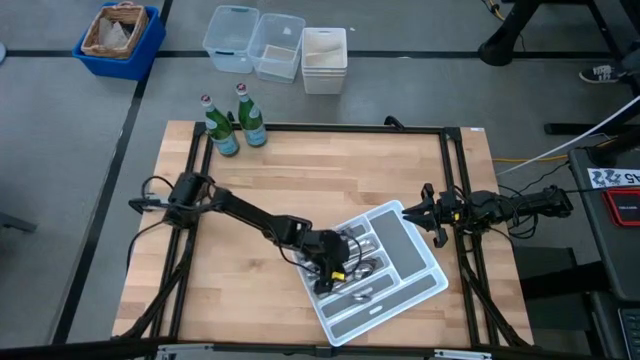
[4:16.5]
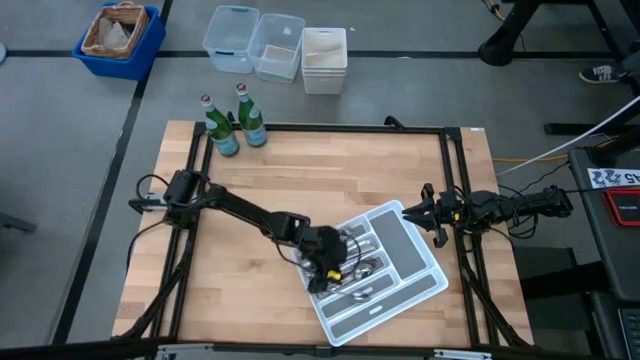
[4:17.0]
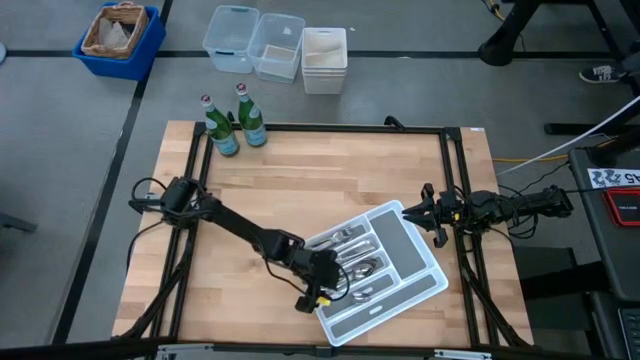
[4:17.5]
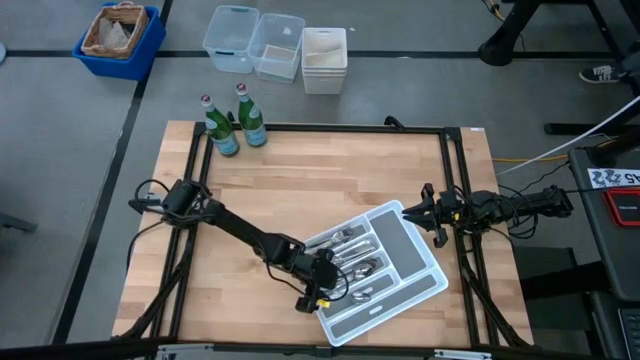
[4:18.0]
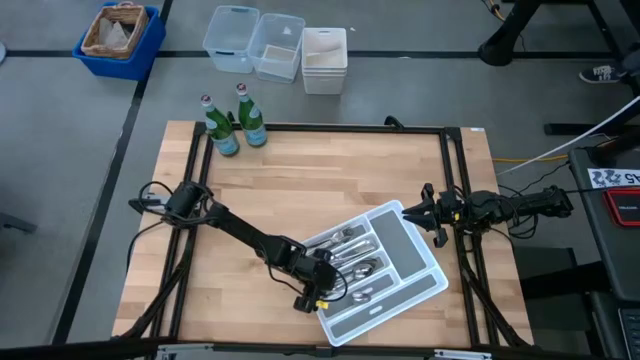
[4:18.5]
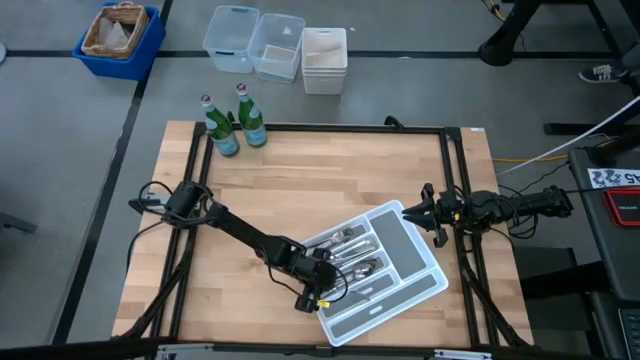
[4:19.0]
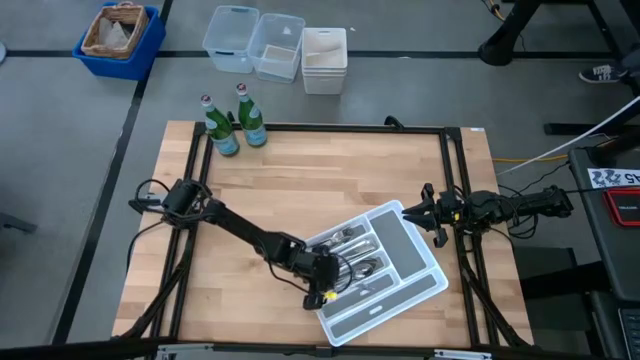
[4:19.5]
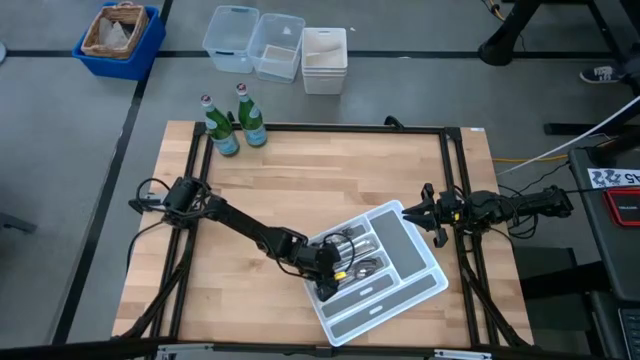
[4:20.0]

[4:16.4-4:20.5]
Task: Sort silverware
Put the silver spoon into the white silverware tray

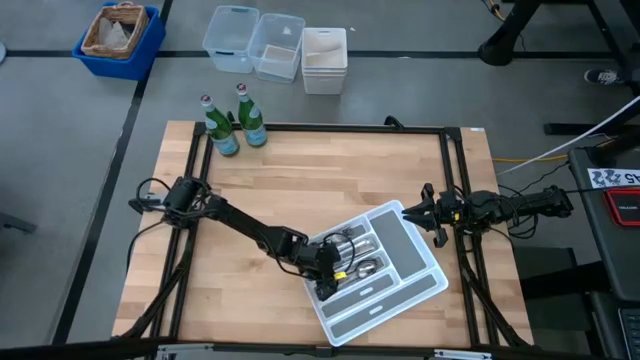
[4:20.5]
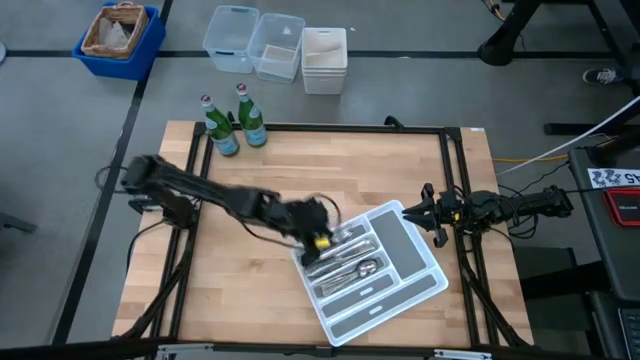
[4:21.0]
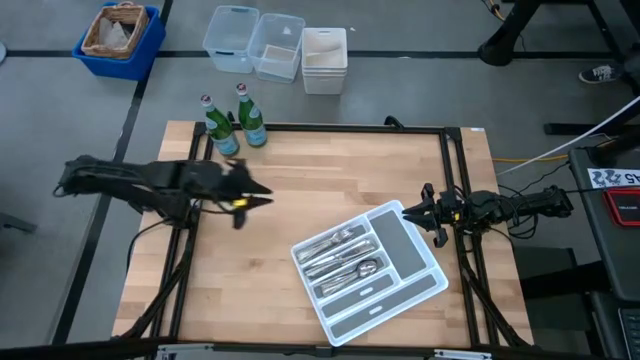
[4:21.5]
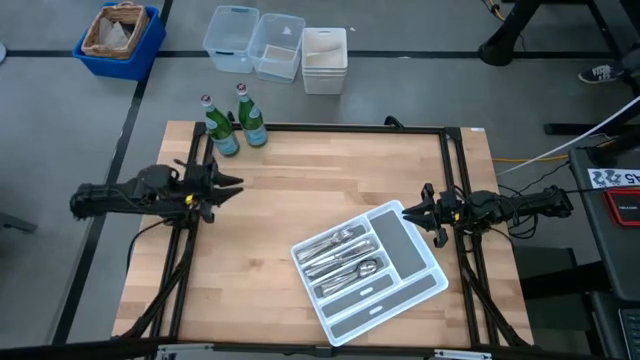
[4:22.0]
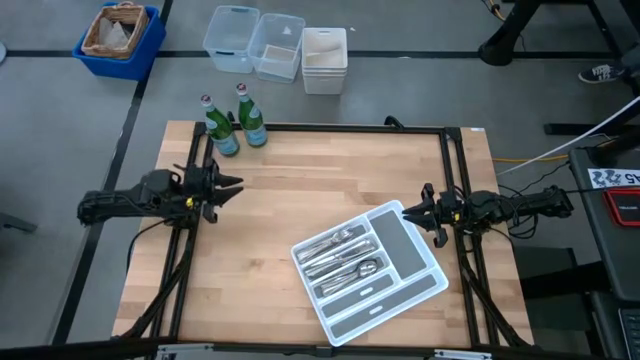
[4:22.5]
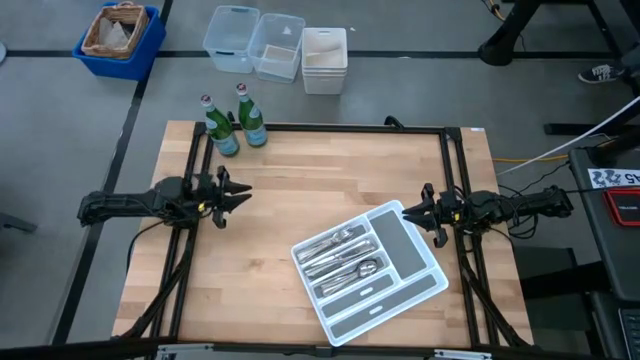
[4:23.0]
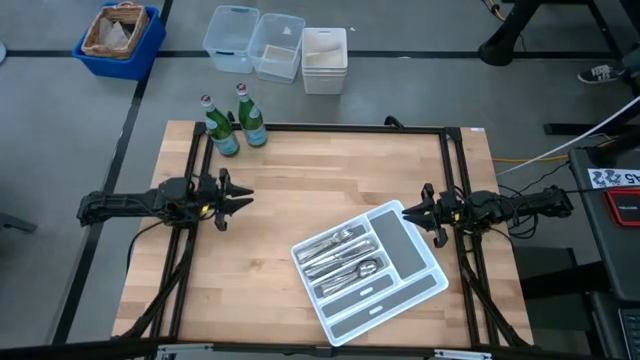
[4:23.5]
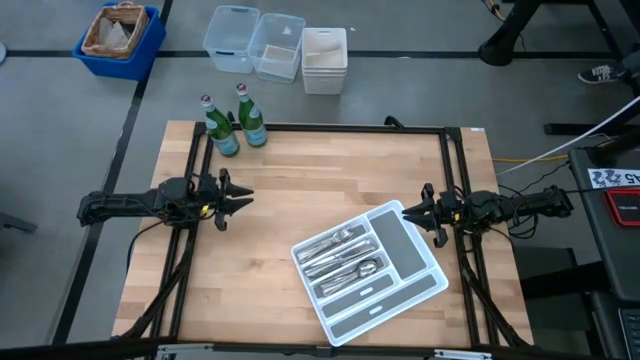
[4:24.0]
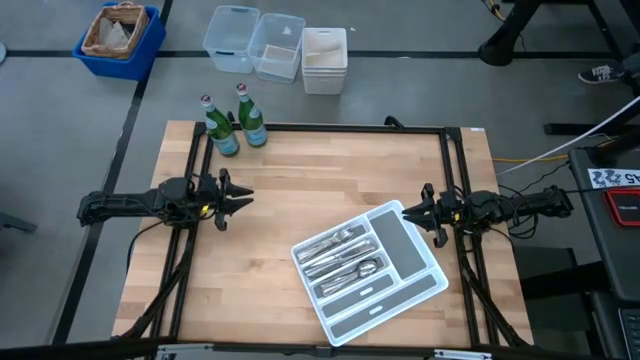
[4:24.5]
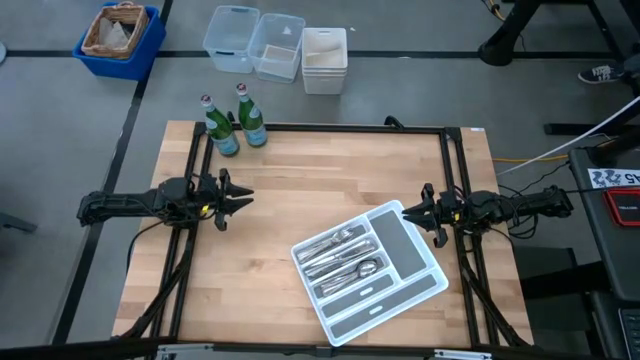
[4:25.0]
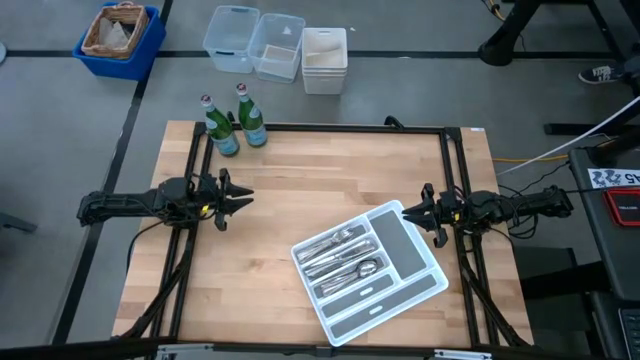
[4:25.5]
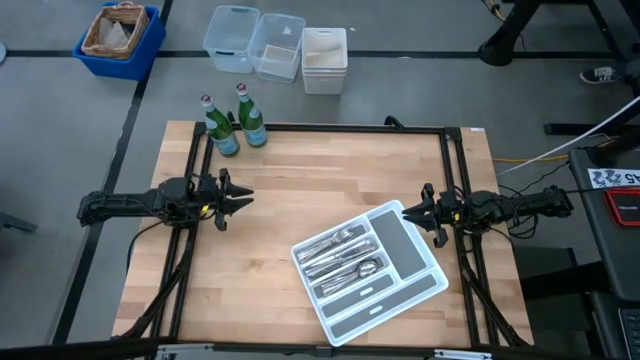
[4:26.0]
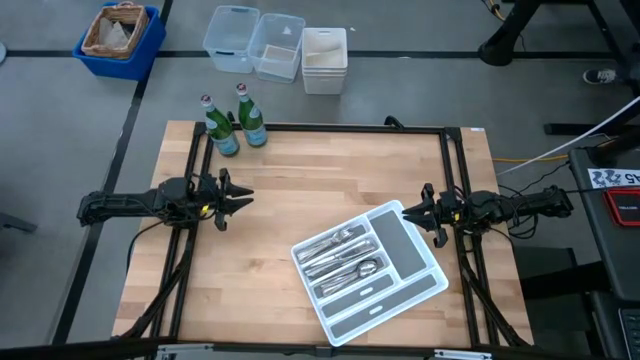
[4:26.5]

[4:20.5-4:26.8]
Return to Home Position

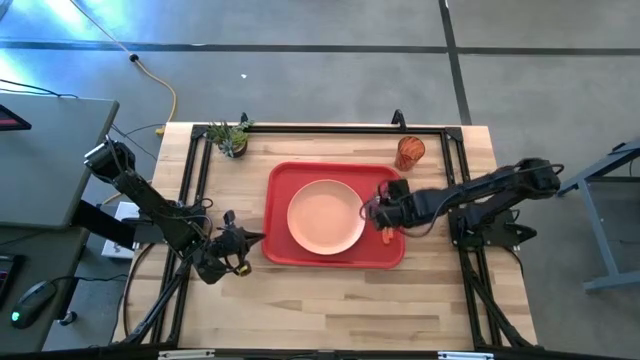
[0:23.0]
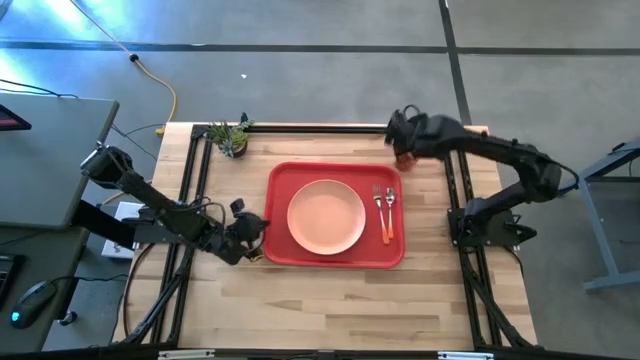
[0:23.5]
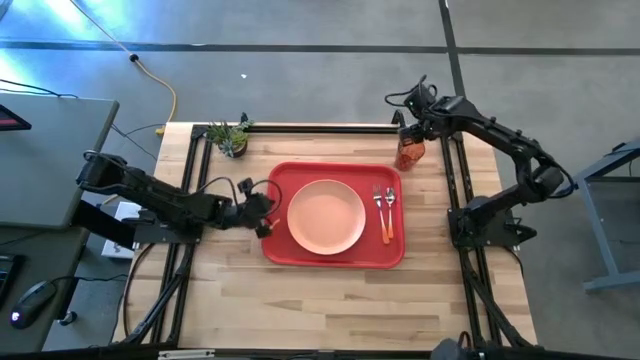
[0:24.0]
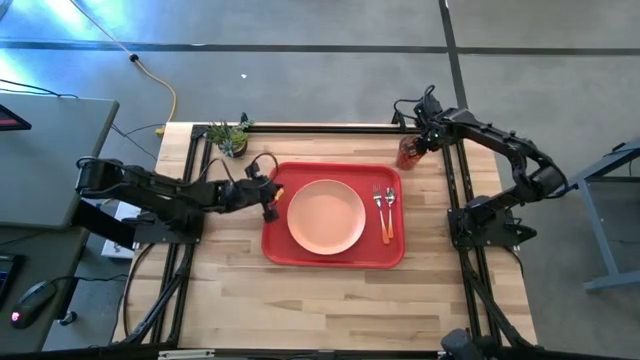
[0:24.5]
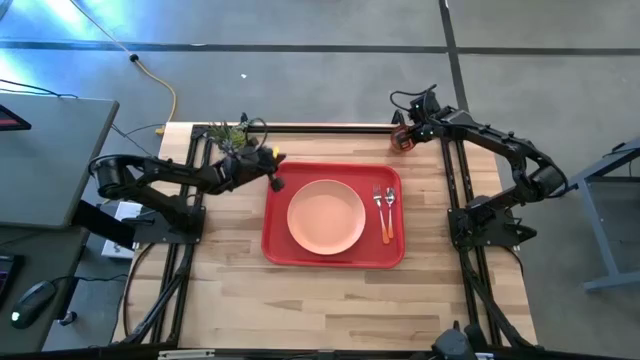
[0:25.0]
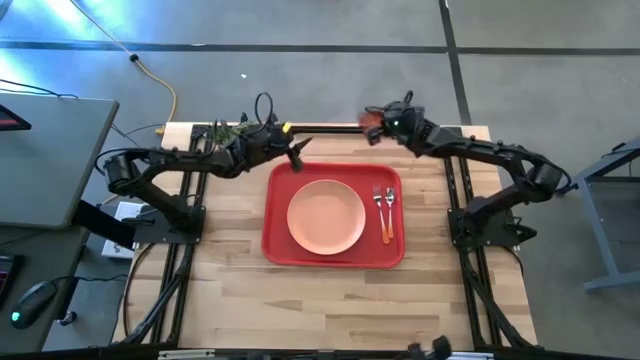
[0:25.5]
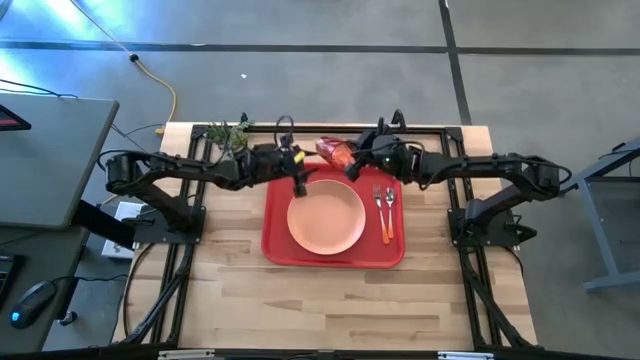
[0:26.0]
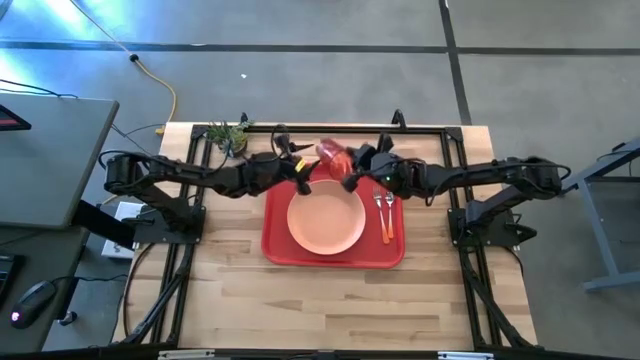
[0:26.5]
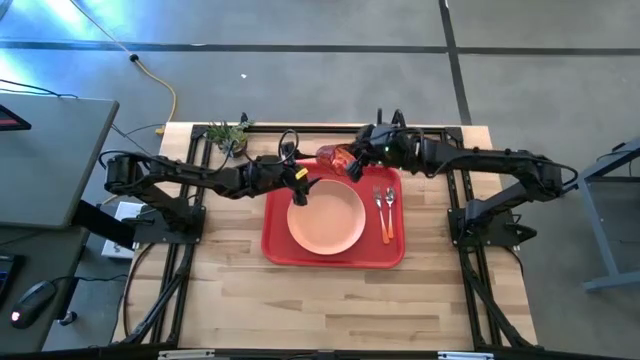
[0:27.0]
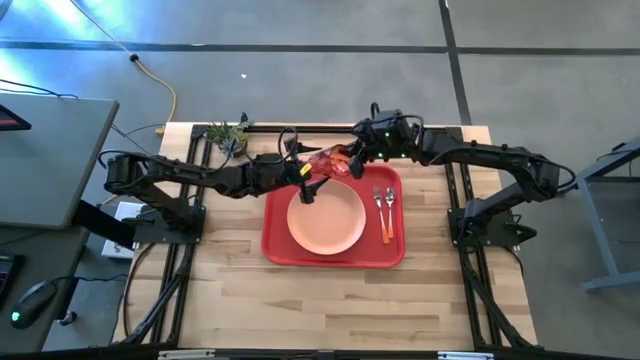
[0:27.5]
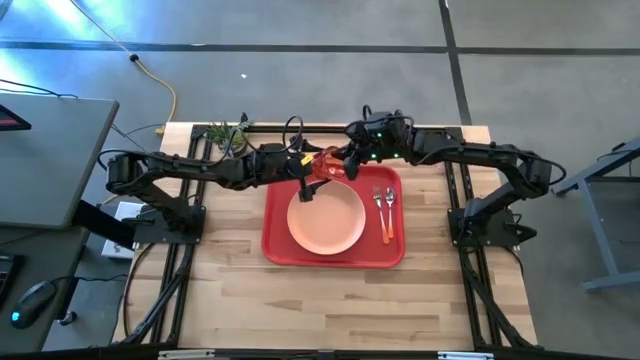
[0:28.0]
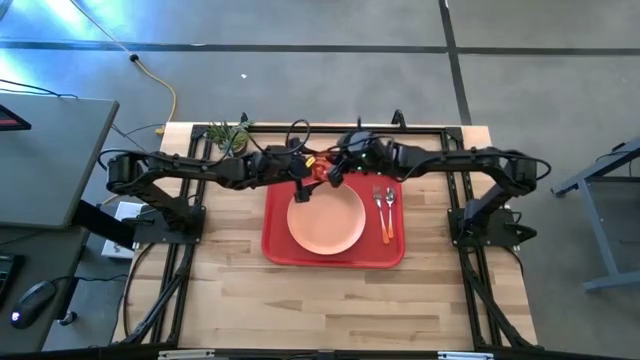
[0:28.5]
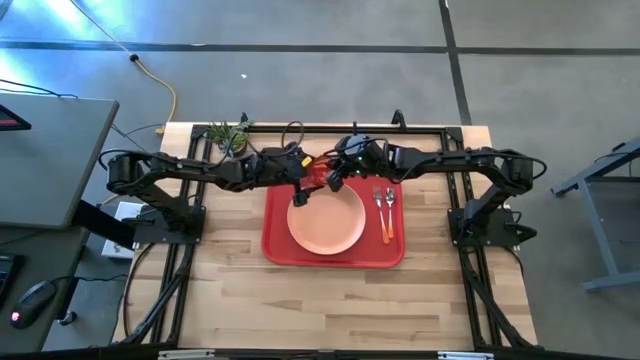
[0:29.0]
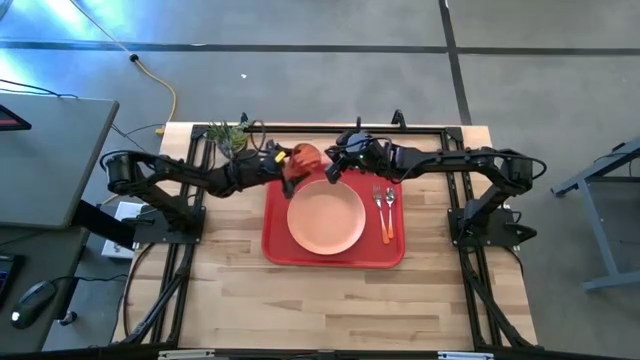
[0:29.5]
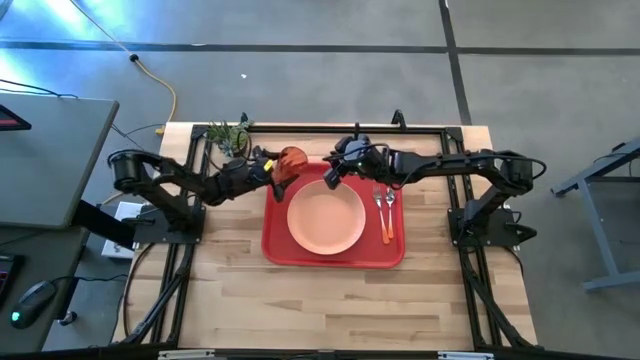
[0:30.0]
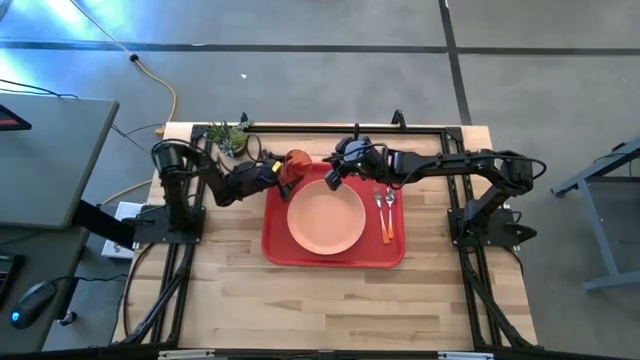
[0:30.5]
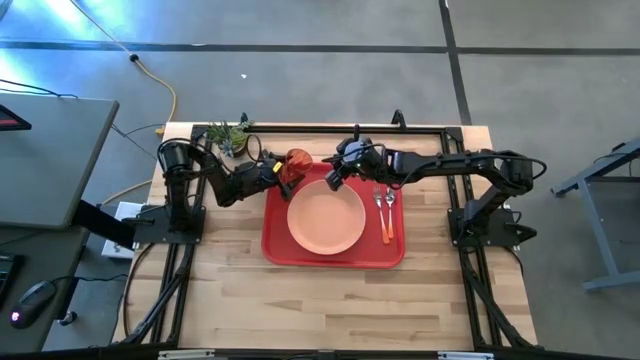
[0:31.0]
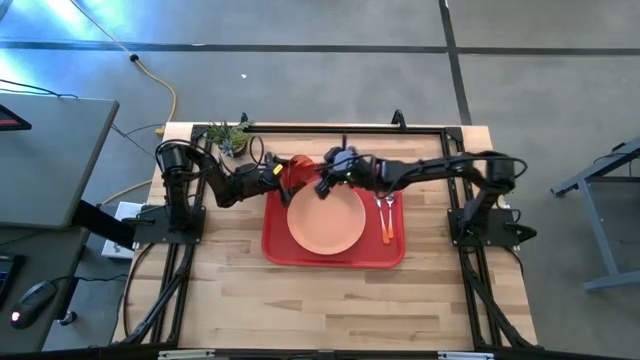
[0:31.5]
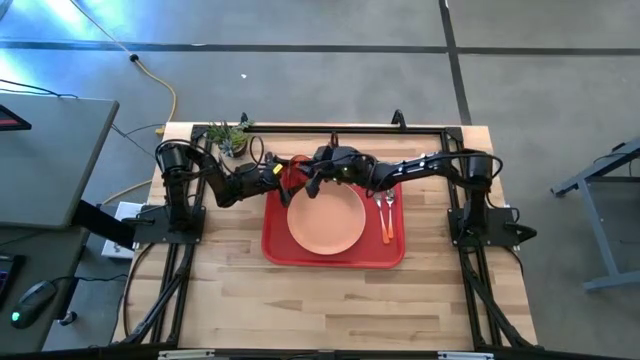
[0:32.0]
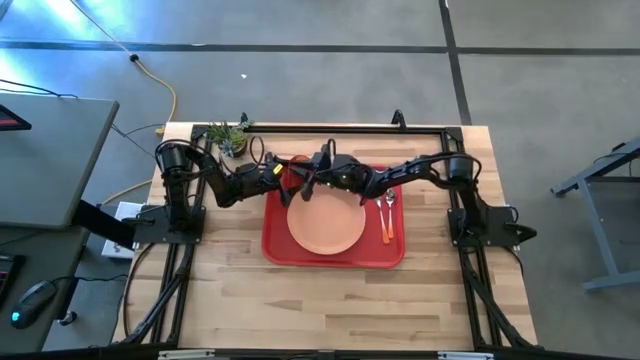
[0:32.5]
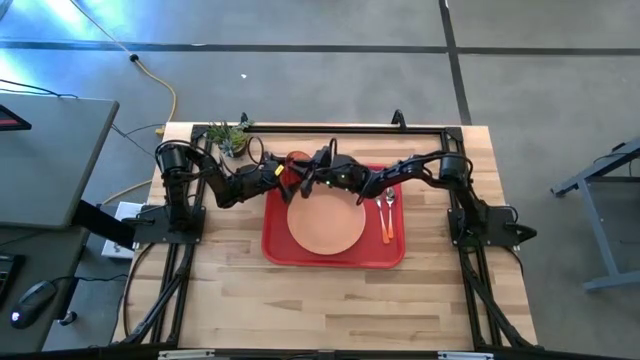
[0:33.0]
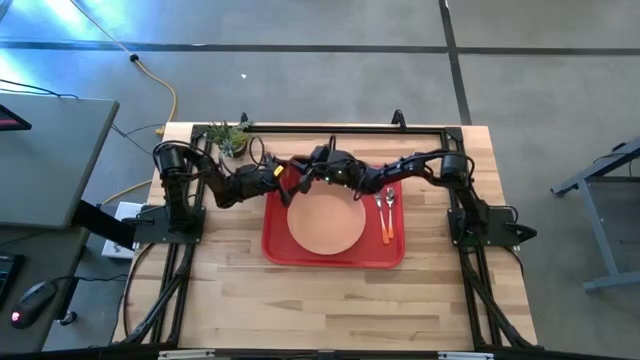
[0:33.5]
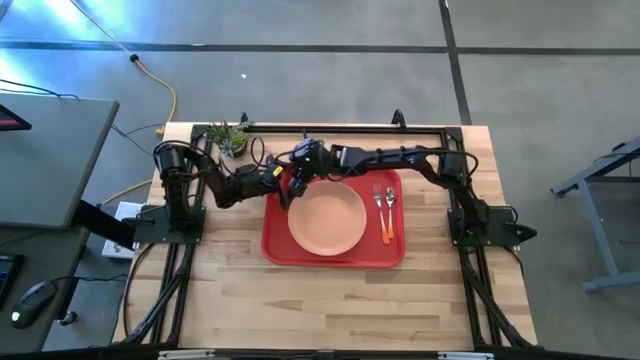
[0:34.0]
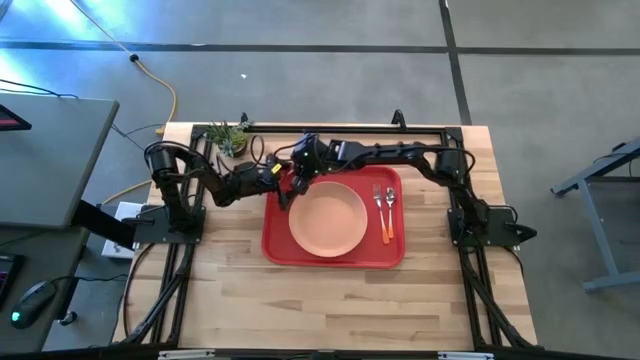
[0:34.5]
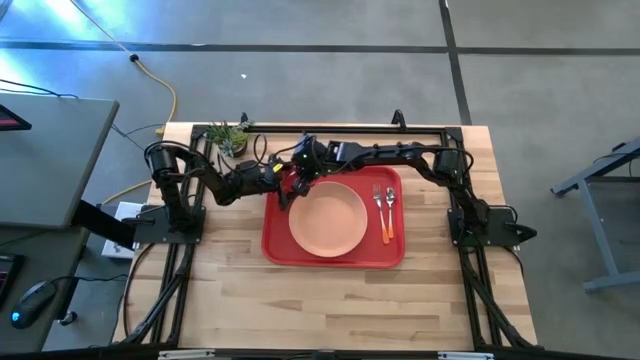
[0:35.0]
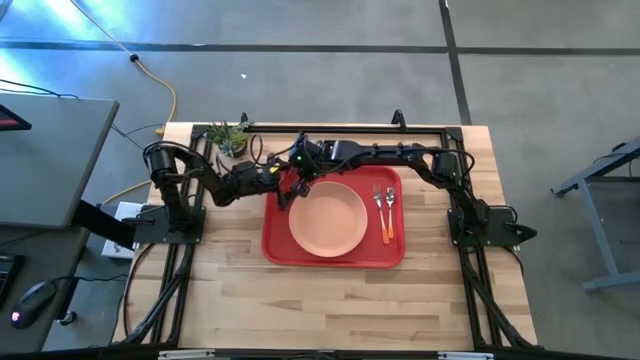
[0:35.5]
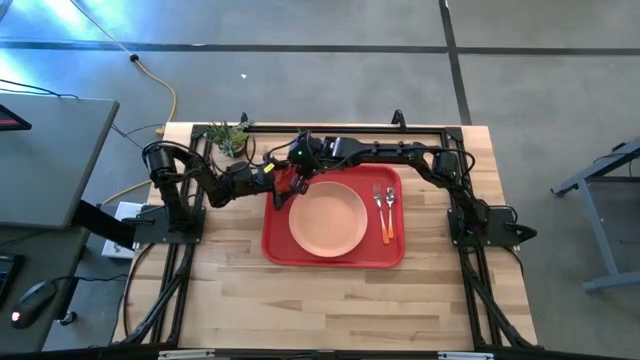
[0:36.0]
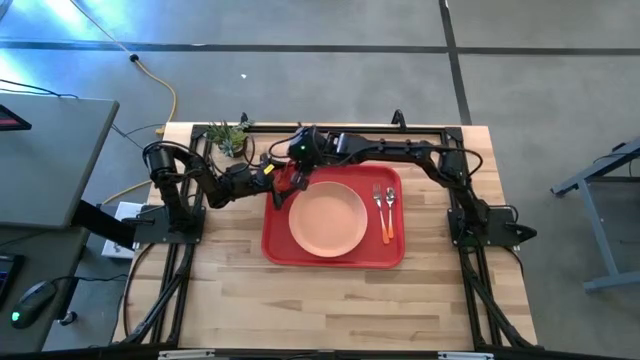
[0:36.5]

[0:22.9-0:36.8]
Task: Pick and place plate/cup/fork/spoon on tray
Put the brown cup on the red tray
